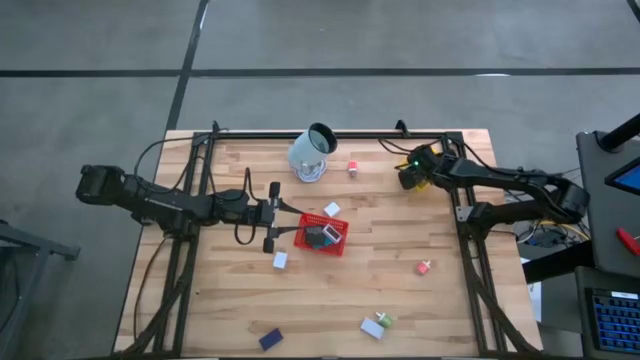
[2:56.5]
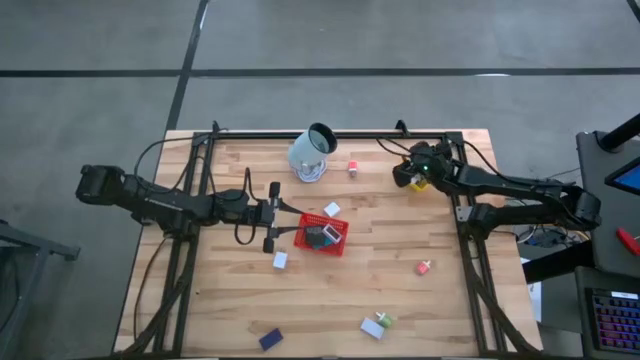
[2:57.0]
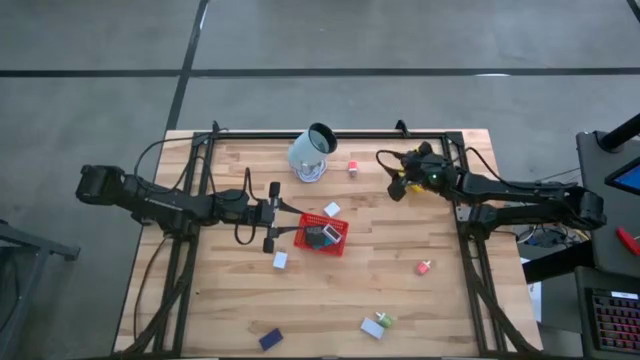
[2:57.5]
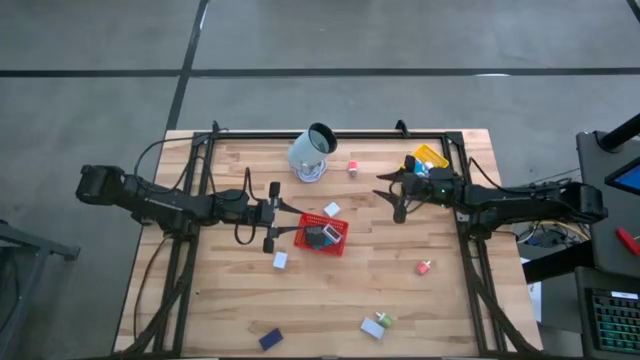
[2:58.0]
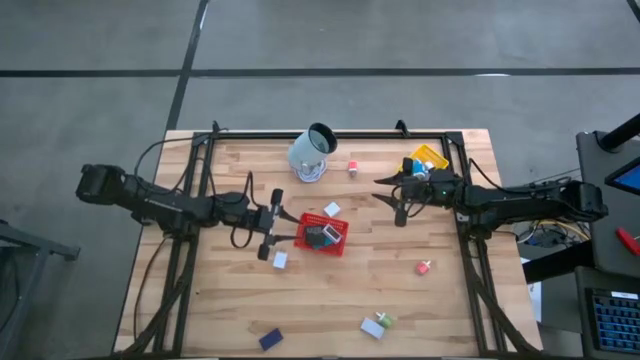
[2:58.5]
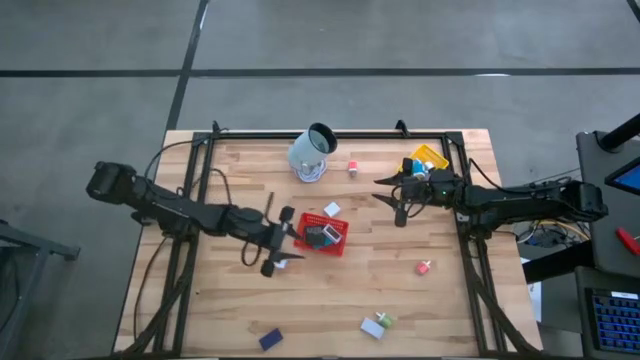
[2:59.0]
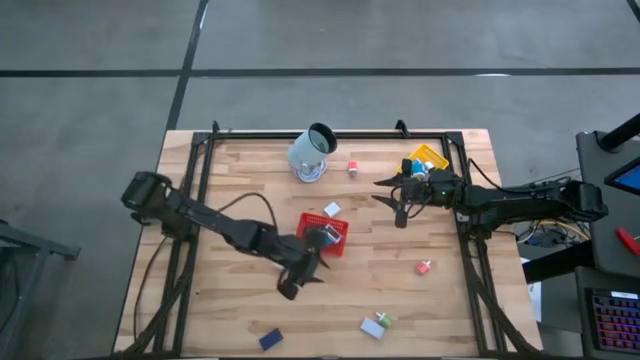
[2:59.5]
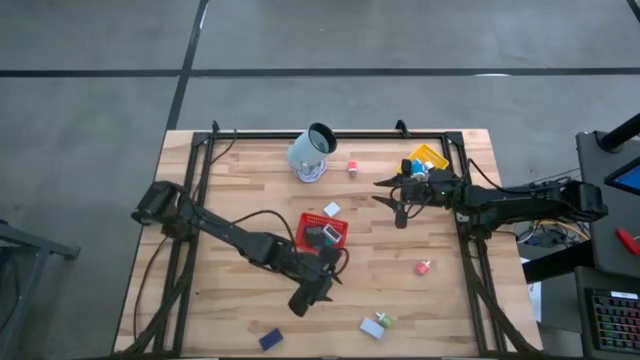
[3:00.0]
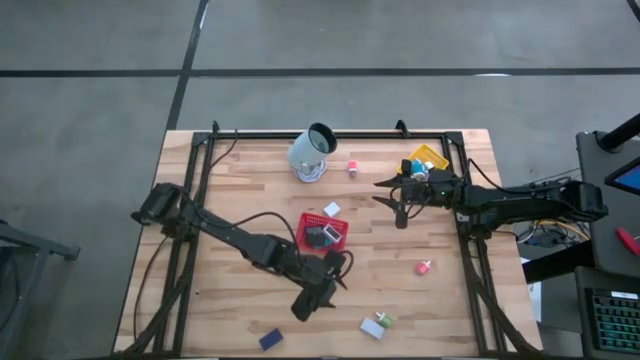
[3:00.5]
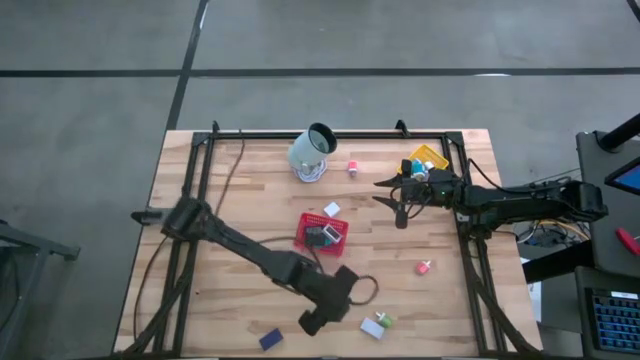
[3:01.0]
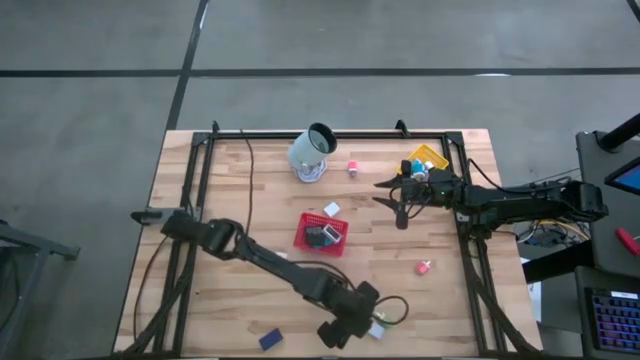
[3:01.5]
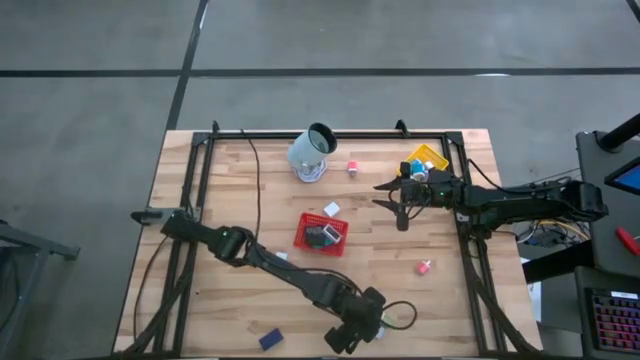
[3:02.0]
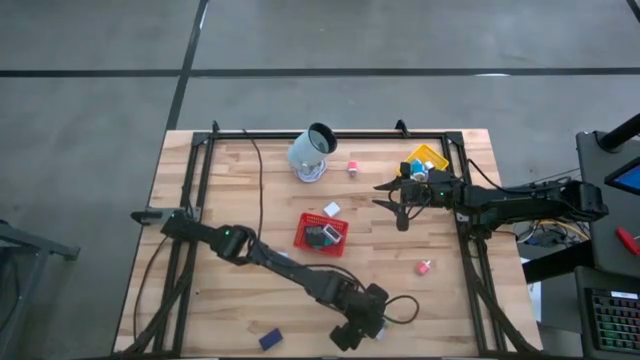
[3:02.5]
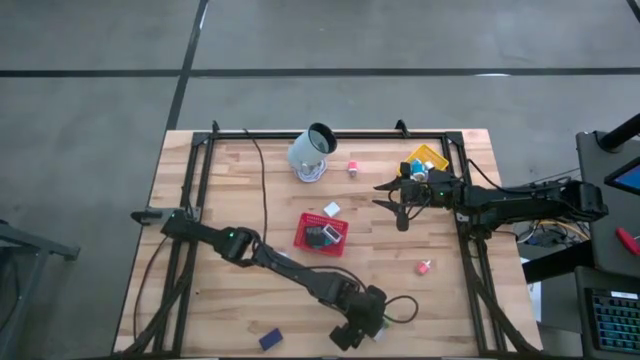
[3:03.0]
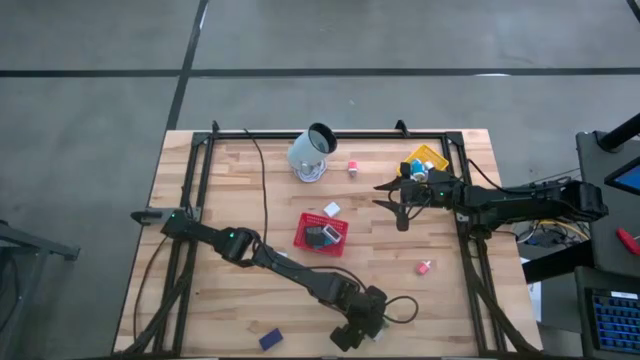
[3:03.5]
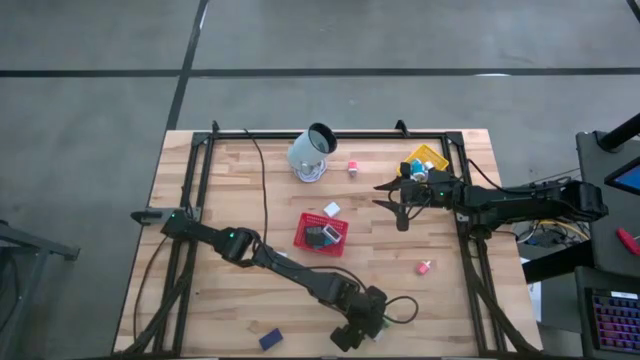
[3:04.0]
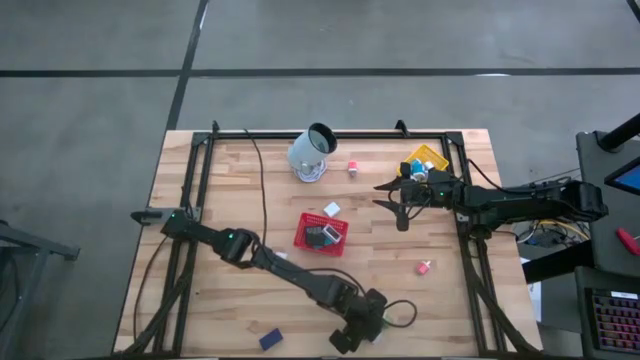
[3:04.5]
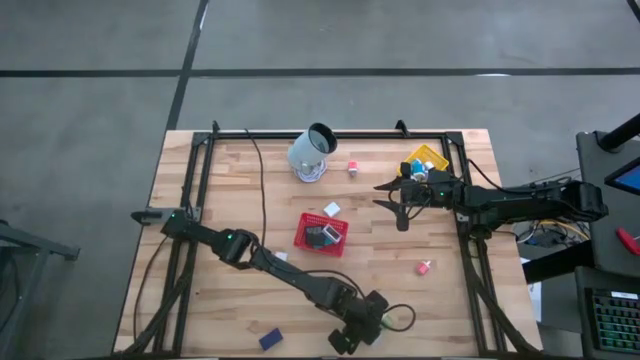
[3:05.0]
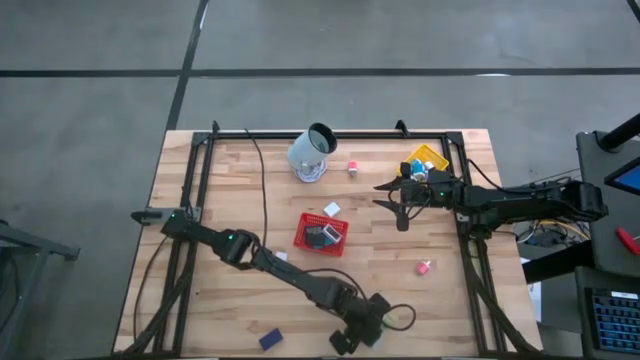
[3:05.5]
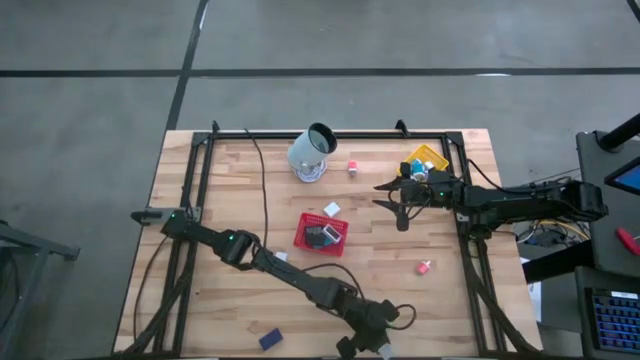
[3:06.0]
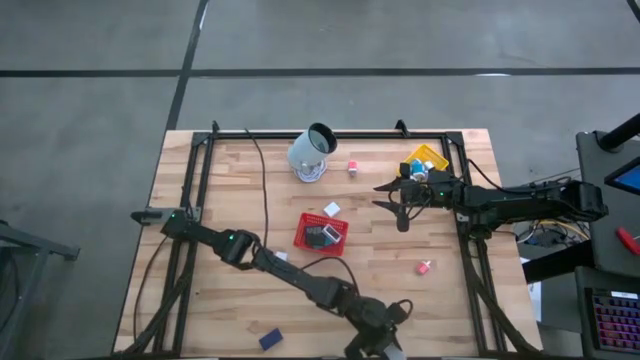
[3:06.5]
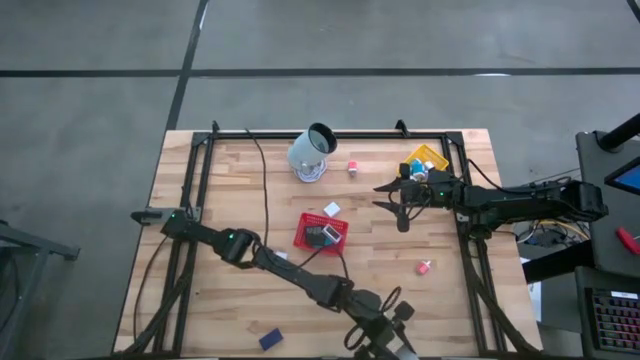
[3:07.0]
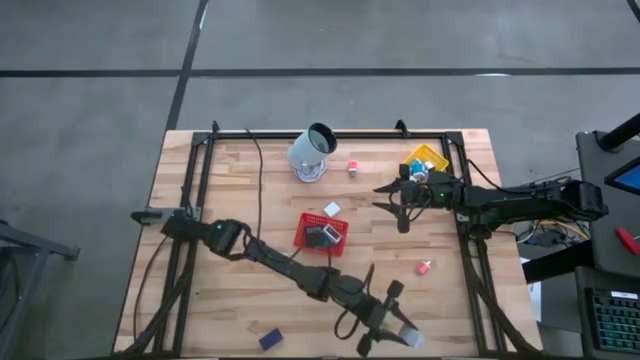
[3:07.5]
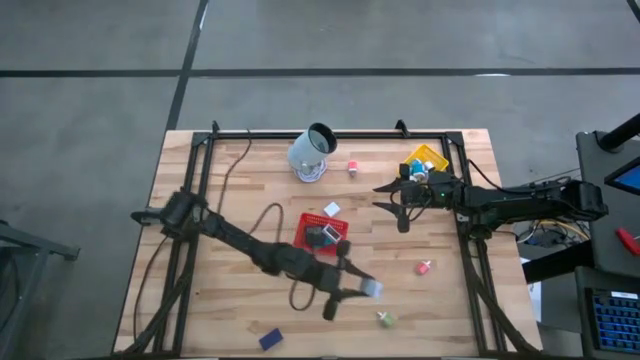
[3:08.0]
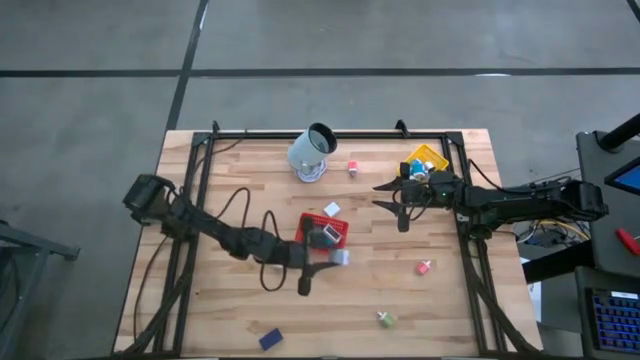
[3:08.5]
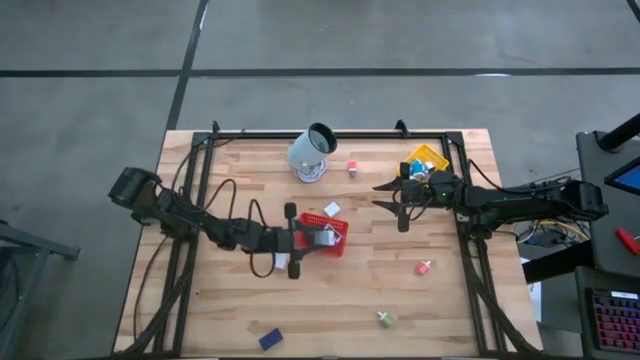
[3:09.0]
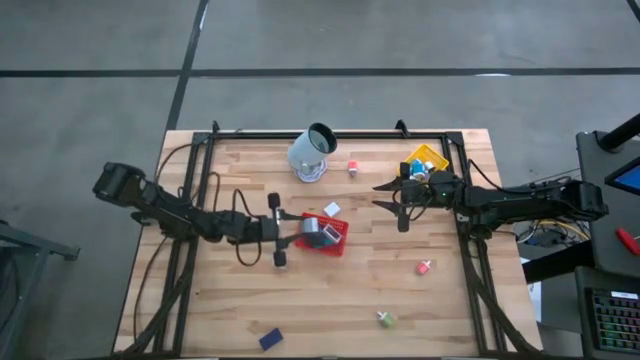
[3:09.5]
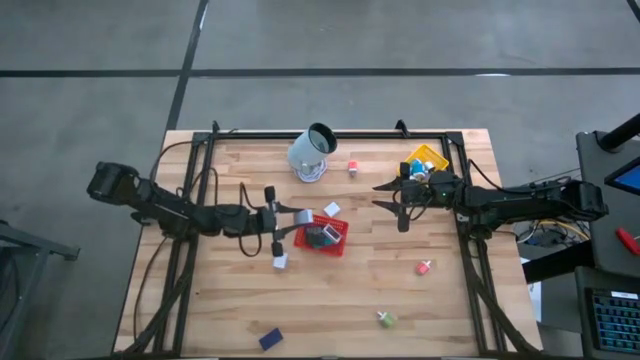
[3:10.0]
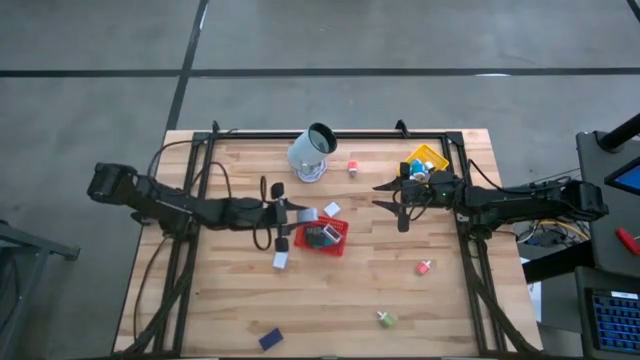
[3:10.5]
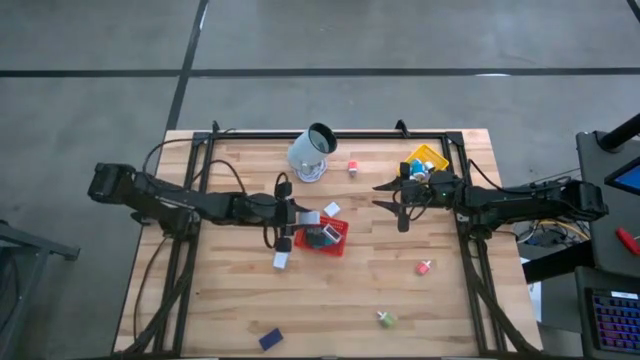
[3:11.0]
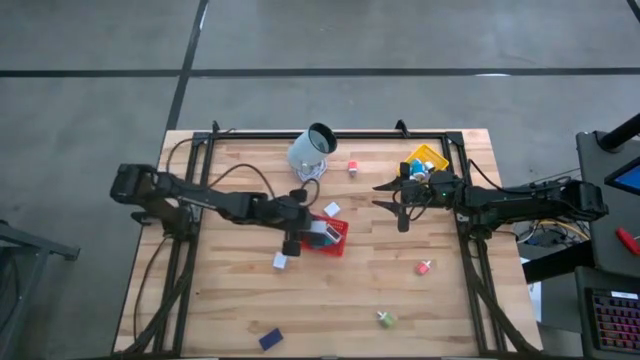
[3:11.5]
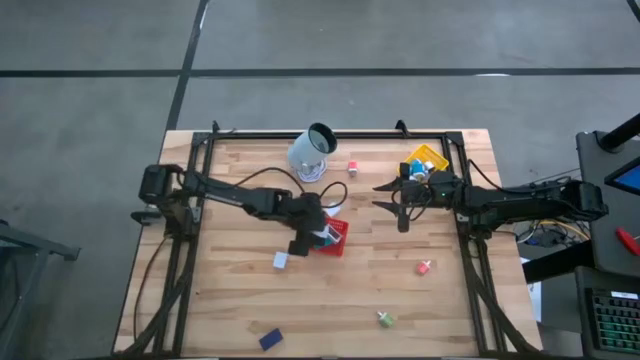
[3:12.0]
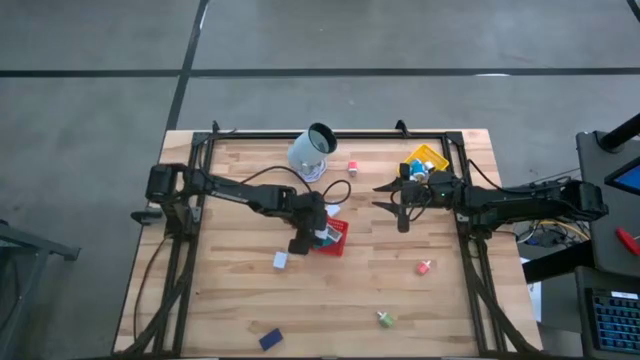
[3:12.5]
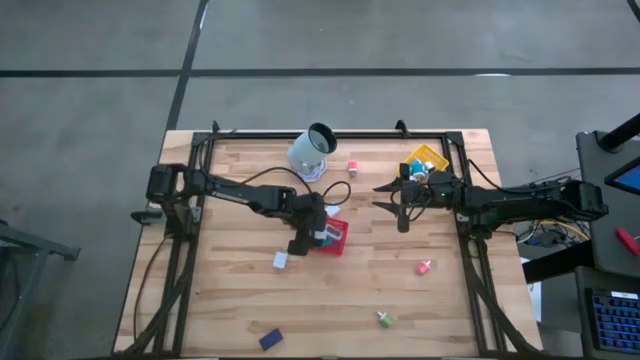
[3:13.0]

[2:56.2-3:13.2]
Task: Pick & Place Office items
Put the white digital clock into the red basket

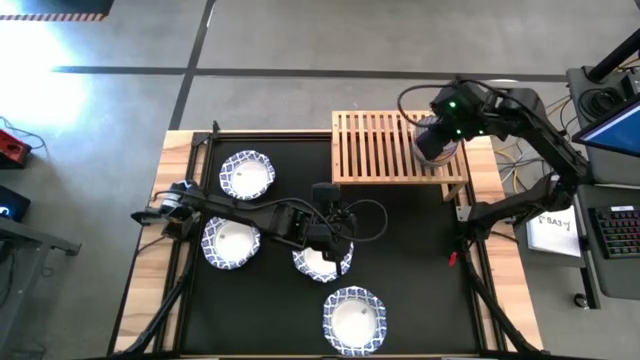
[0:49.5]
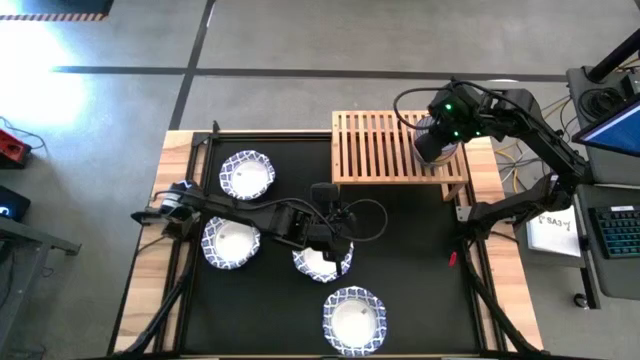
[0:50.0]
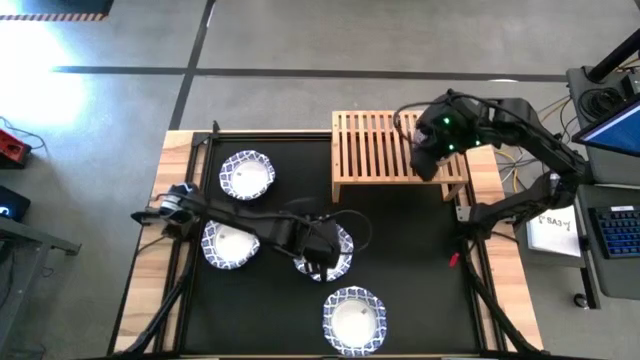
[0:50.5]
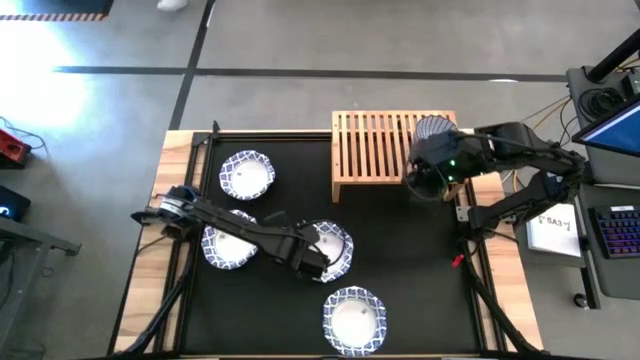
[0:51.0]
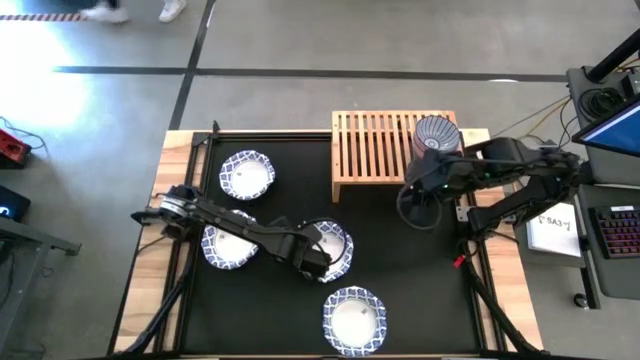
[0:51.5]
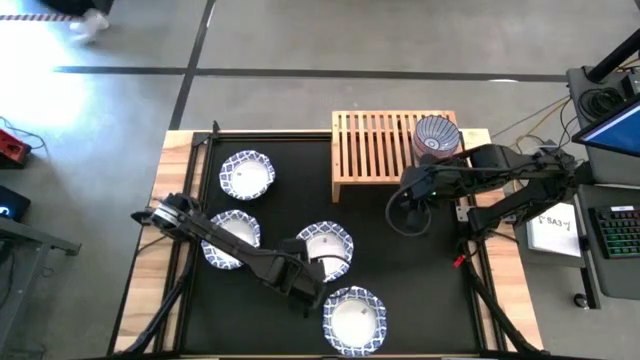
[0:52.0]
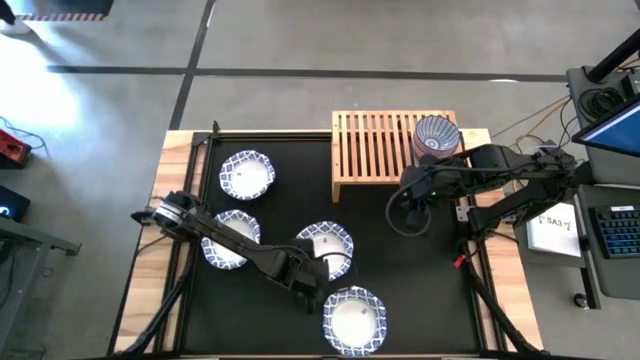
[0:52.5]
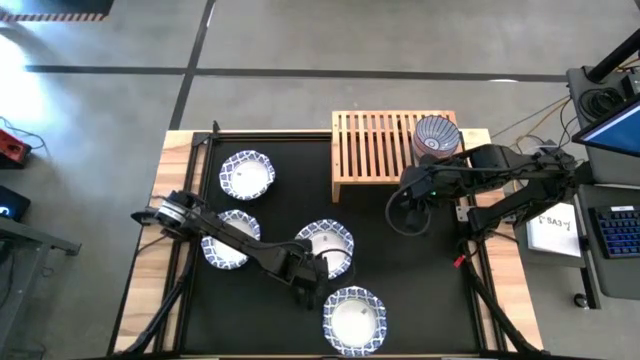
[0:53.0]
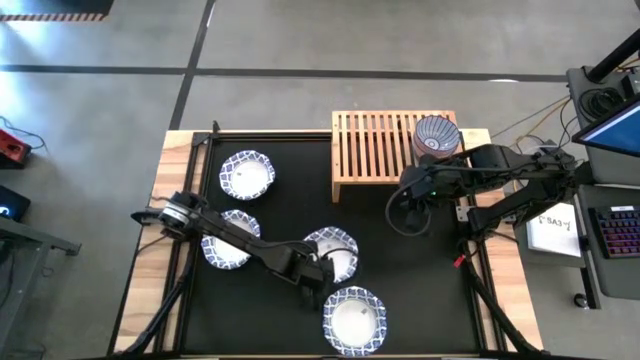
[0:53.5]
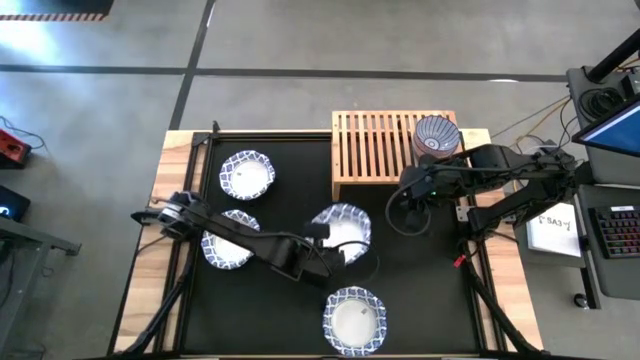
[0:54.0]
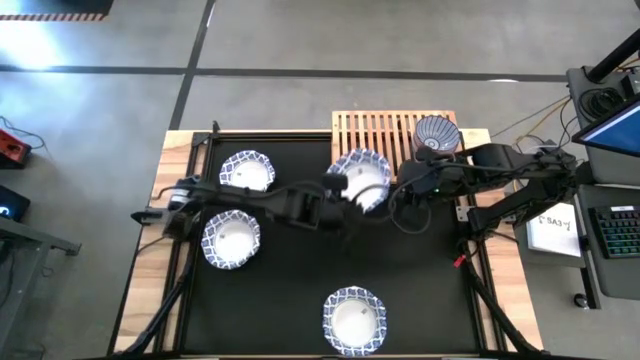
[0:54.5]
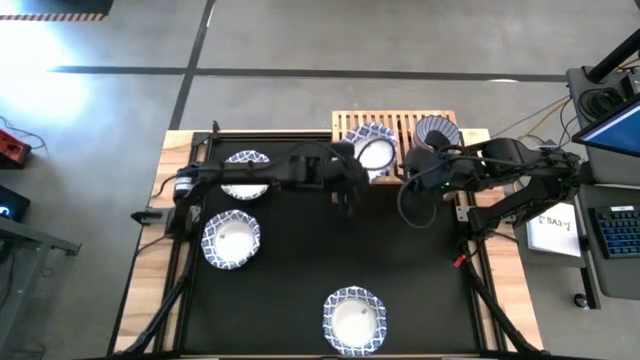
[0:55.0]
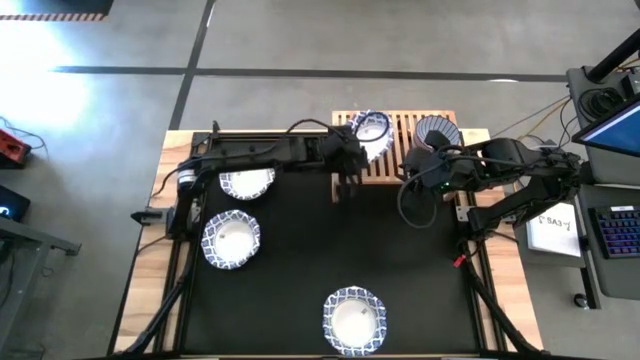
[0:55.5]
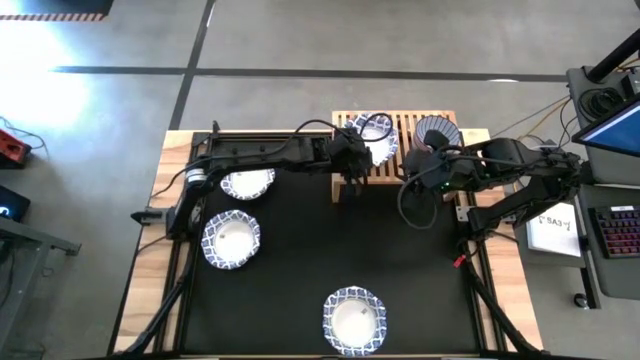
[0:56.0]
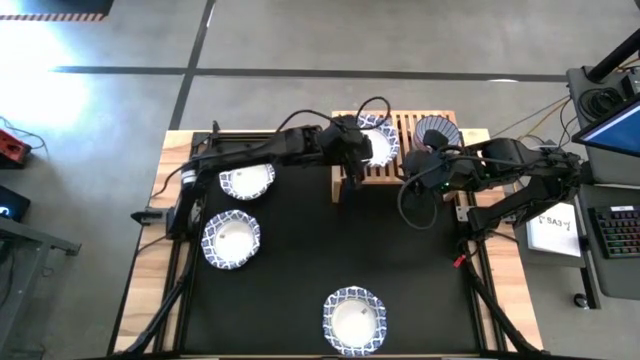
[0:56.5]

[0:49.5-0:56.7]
Task: Place and stack bowls onto a shelf
Put the white bowl on the shelf
